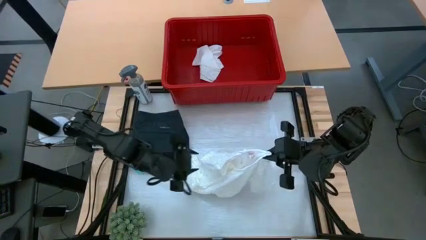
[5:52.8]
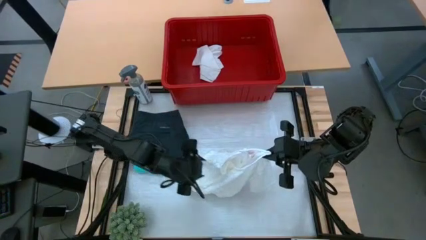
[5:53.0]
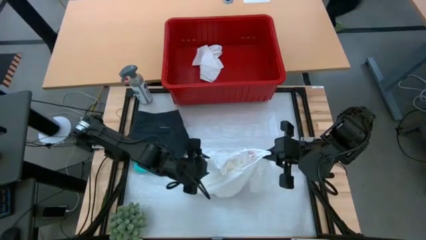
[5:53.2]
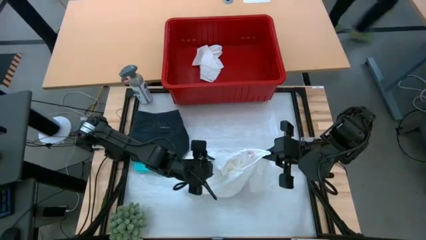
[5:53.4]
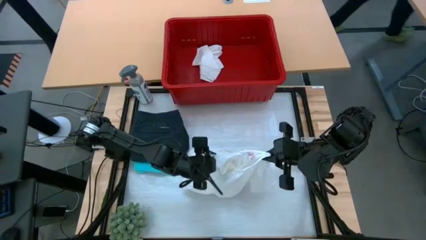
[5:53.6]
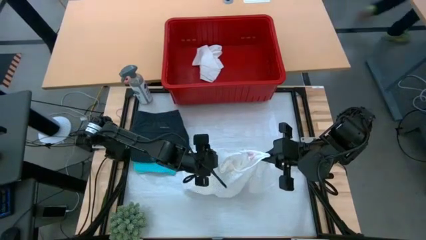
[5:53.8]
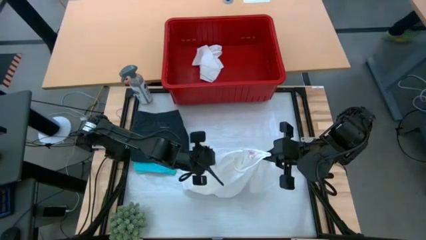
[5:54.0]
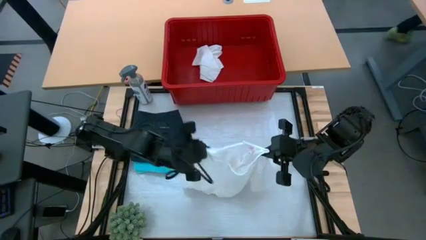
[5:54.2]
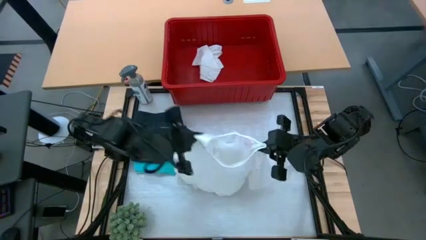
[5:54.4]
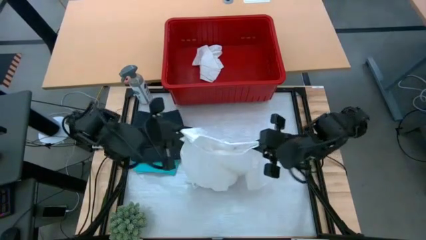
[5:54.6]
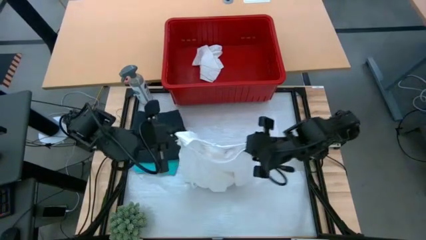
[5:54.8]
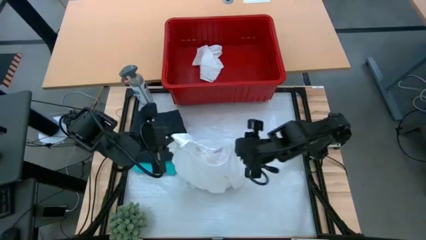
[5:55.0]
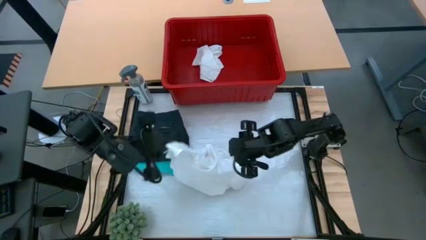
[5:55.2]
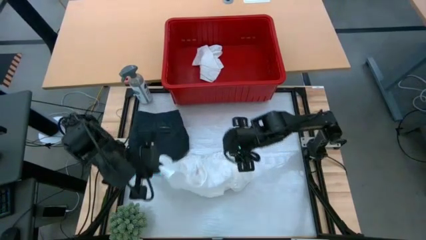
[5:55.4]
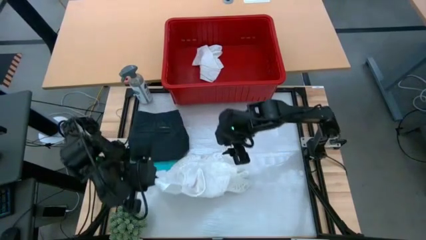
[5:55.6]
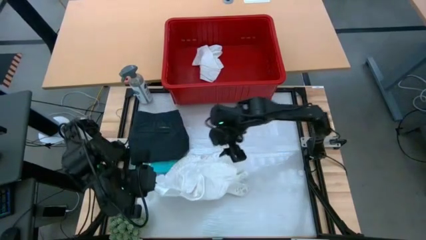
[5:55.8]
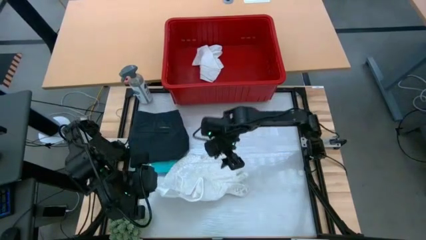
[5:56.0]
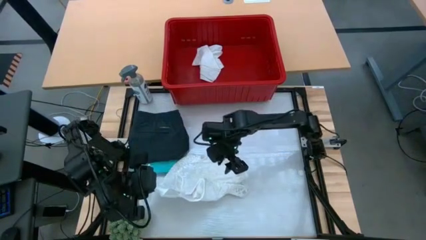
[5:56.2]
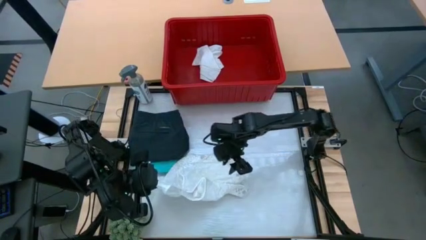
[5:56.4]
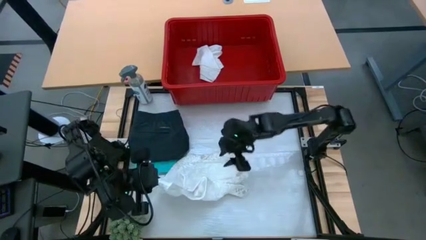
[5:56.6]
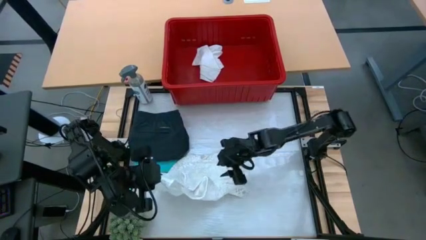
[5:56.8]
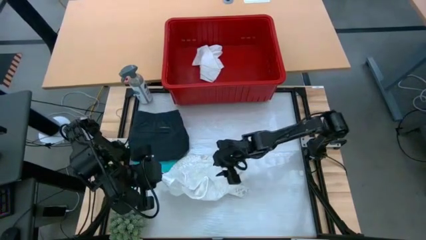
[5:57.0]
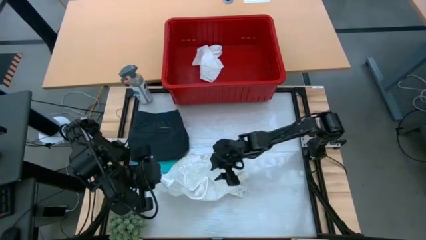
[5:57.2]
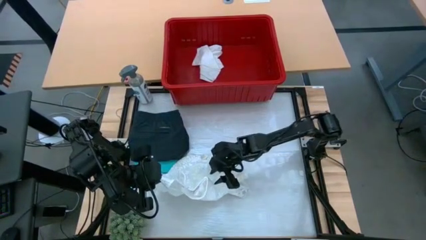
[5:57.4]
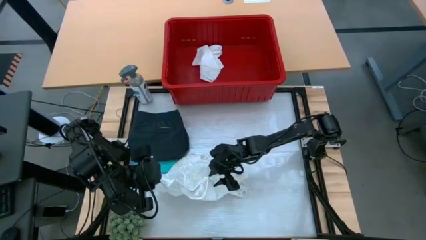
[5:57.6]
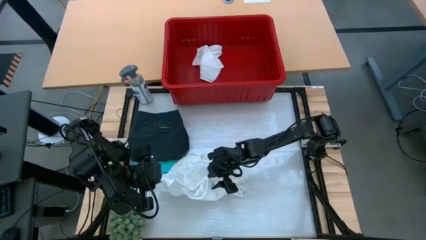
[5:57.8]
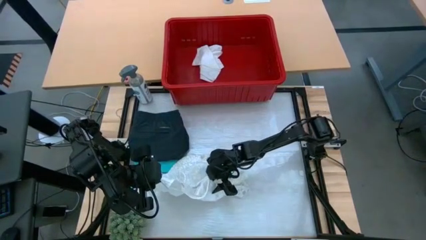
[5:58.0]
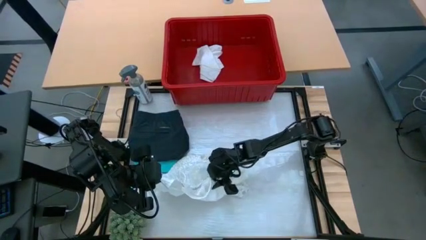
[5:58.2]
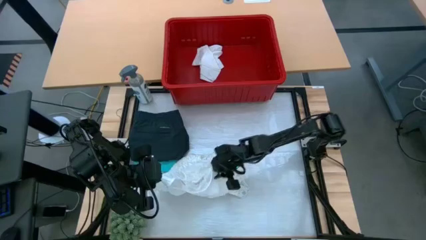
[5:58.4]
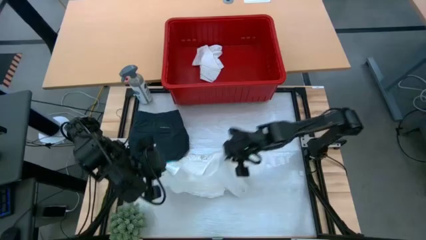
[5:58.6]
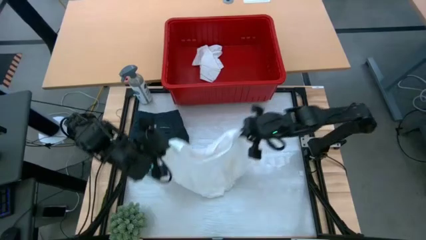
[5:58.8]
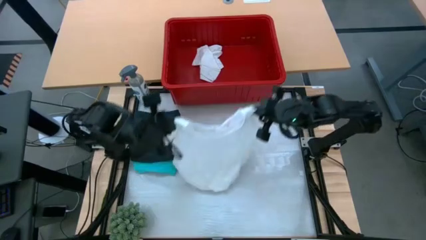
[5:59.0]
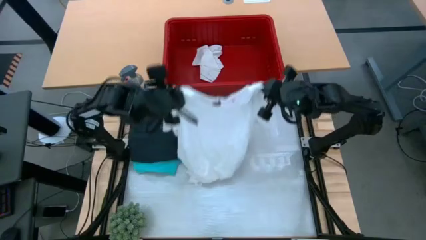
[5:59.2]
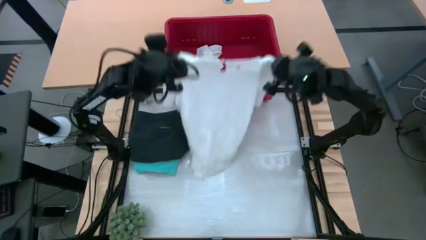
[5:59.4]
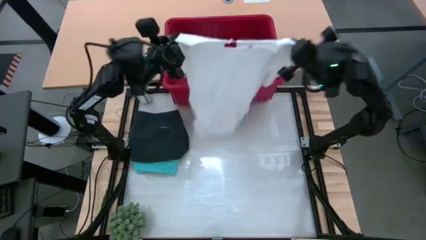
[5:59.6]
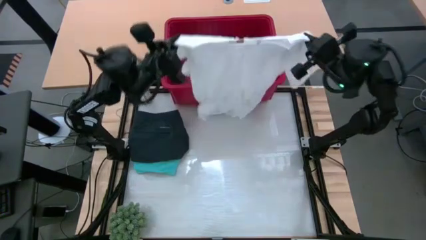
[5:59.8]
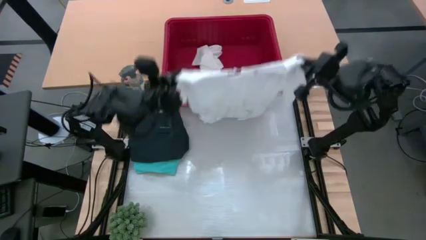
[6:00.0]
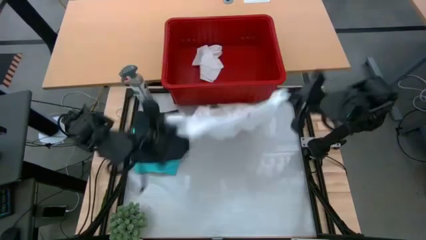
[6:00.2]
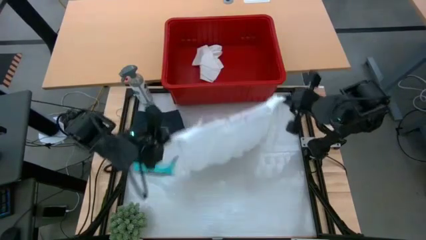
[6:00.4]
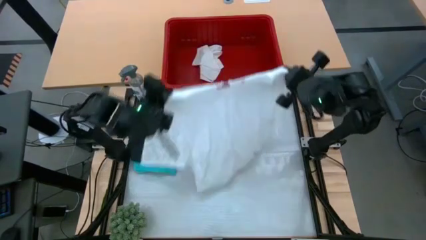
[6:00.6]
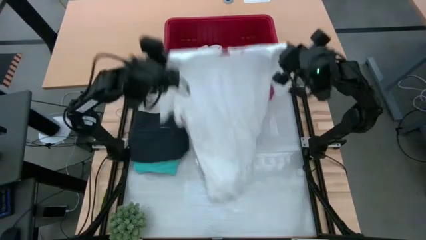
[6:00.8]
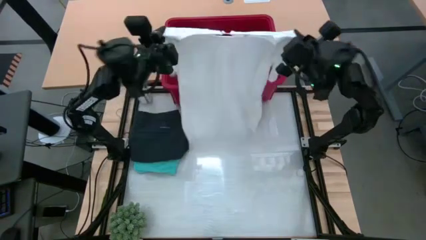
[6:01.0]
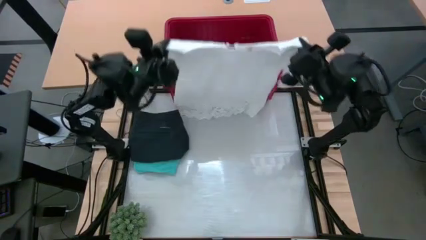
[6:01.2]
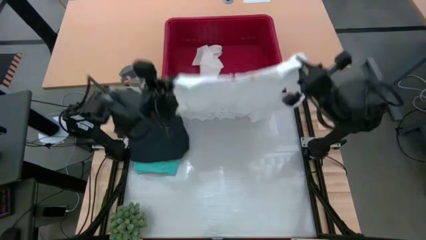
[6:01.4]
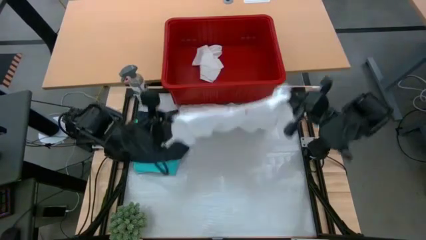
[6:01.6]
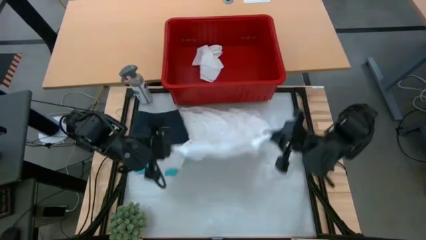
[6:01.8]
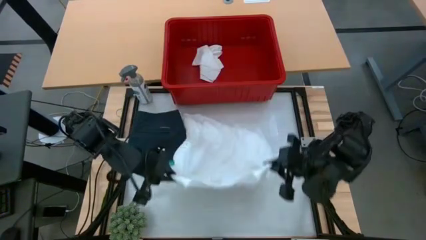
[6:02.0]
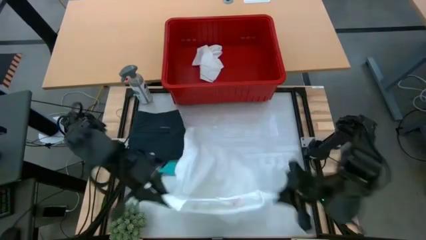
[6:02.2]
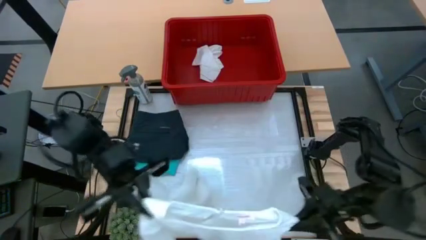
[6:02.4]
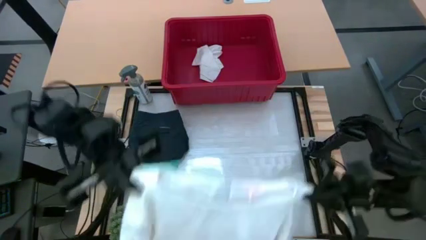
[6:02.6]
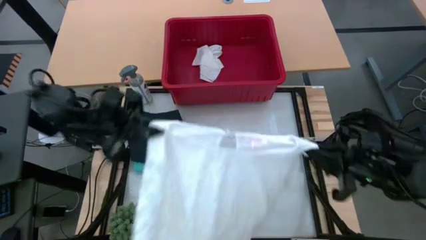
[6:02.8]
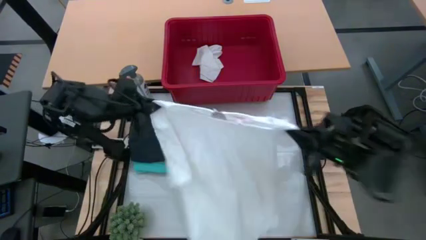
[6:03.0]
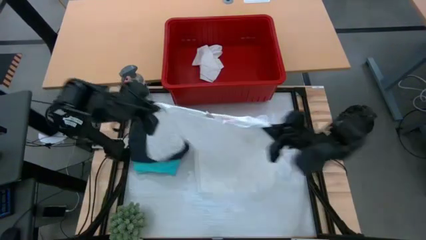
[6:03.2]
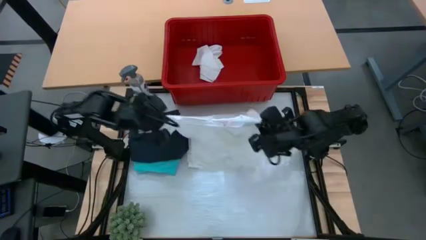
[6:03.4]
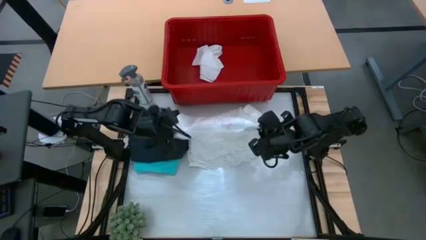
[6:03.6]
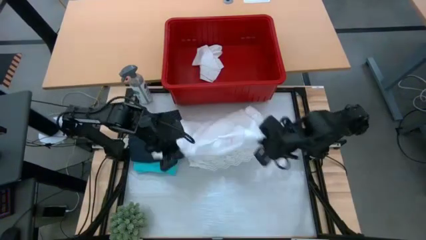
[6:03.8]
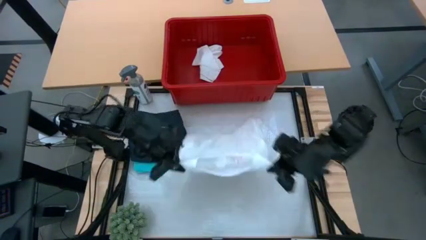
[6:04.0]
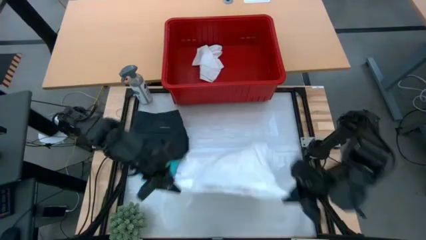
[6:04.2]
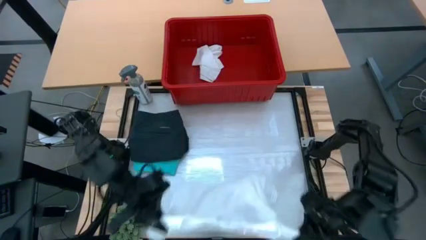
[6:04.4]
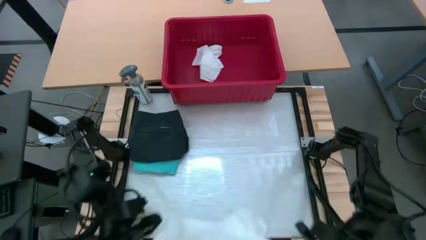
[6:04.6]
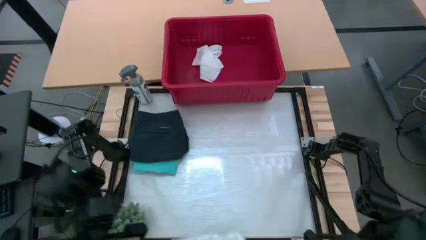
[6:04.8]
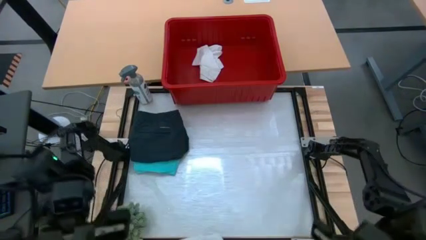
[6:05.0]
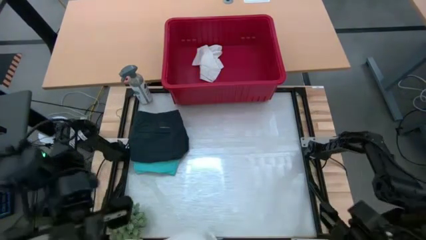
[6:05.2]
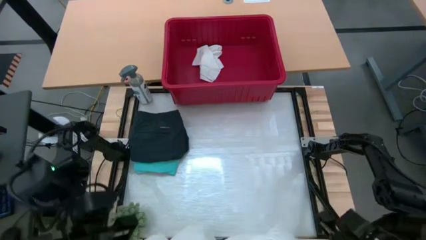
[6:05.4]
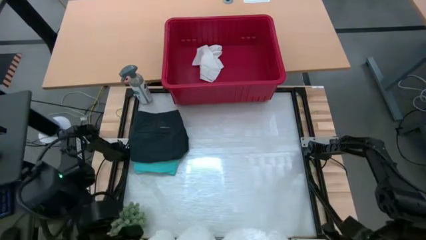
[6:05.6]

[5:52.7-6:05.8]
Task: Fold laundry
Fold the white dress

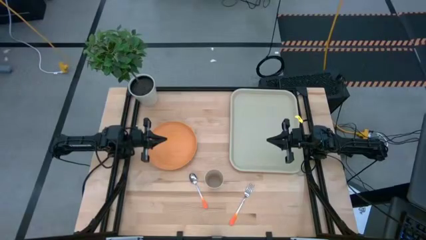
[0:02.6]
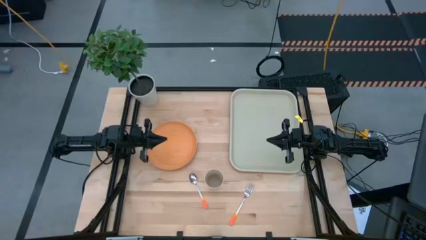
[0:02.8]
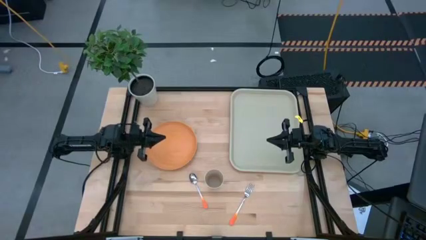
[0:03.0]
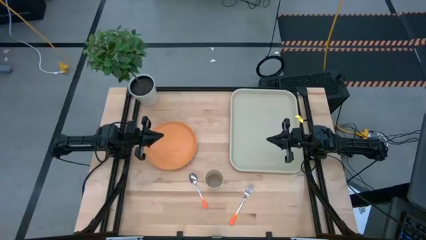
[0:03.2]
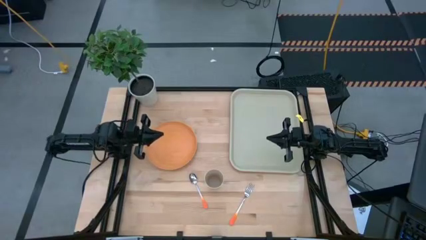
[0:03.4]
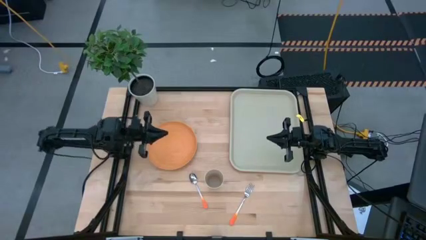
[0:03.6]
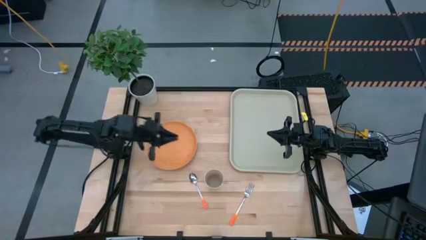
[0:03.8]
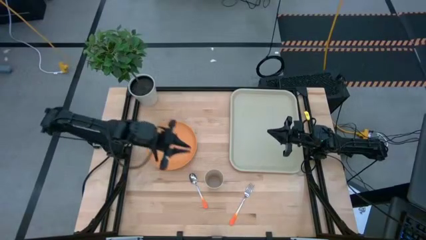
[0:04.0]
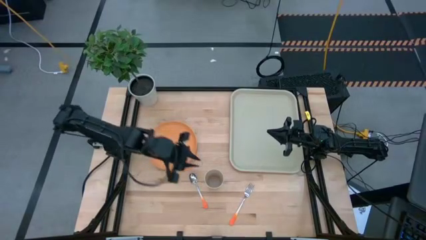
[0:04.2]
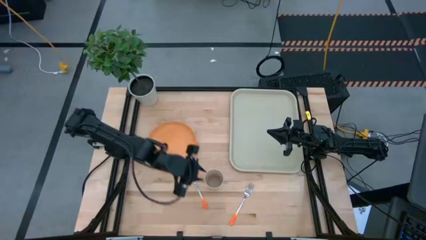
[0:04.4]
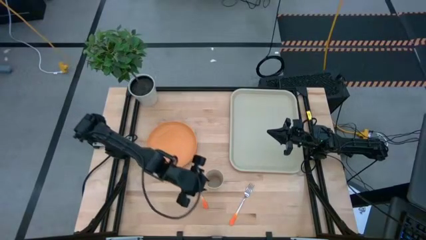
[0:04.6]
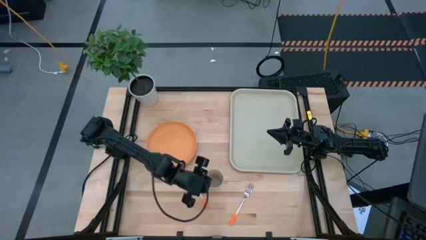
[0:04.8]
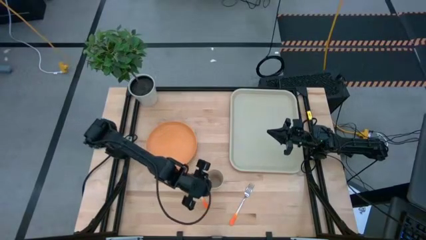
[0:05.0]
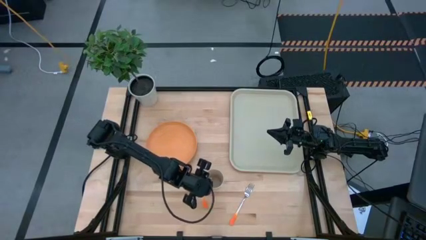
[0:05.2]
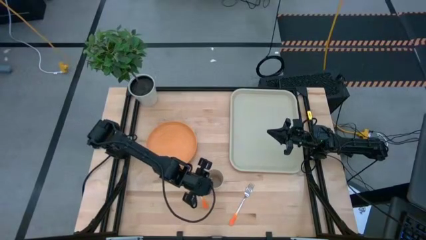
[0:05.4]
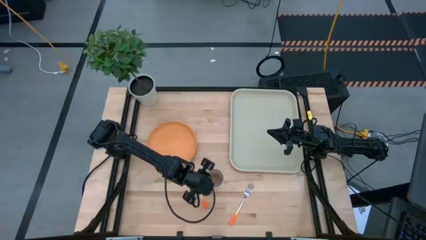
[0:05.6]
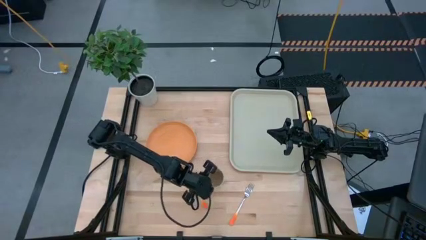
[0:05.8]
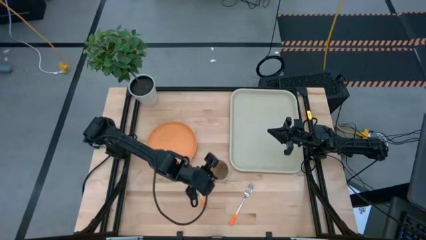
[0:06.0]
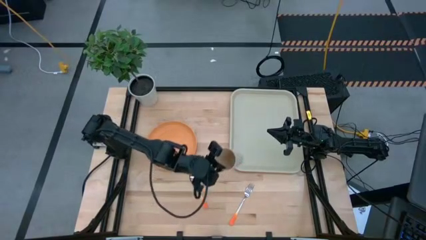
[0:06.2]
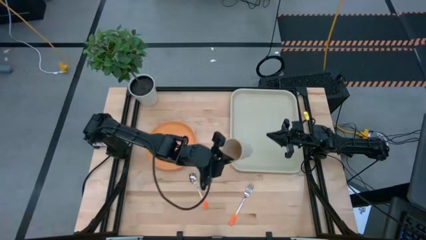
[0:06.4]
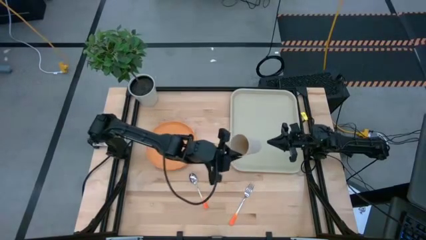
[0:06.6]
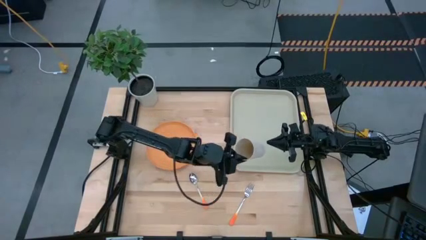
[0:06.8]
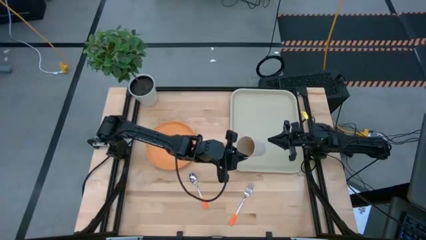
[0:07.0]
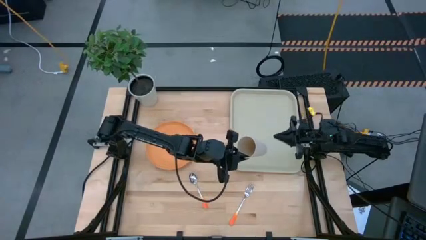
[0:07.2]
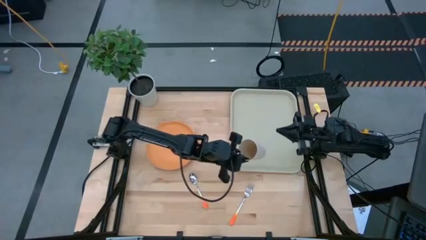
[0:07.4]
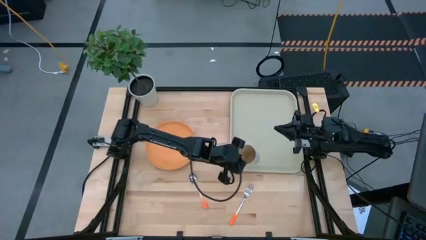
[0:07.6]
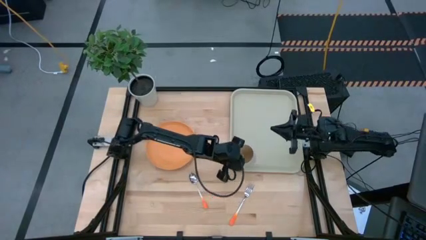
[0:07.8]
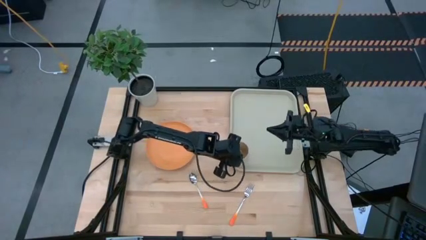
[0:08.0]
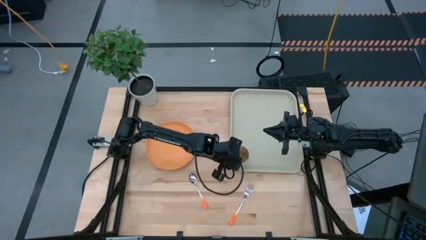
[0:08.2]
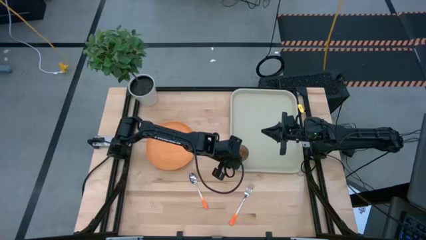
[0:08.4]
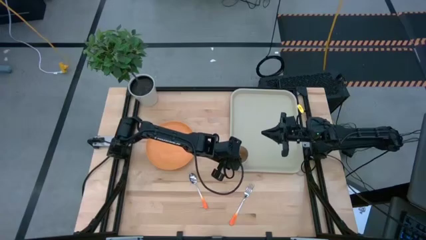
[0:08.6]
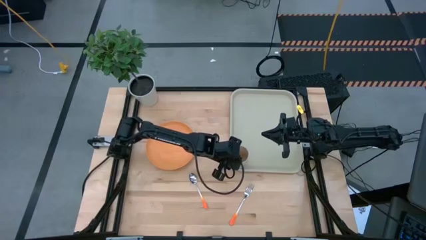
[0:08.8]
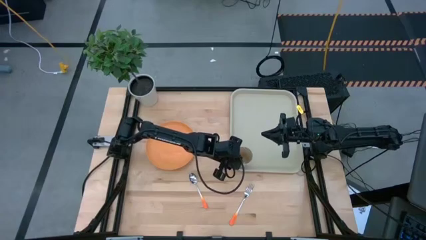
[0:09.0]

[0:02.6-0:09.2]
Task: Pick and place plate/cup/fork/spoon on tray
Put the gray cup on the bottom left of the gray tray
